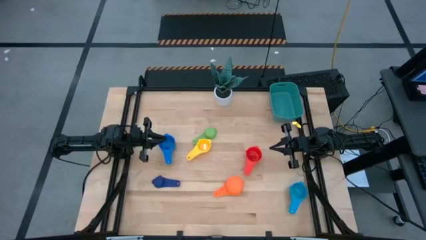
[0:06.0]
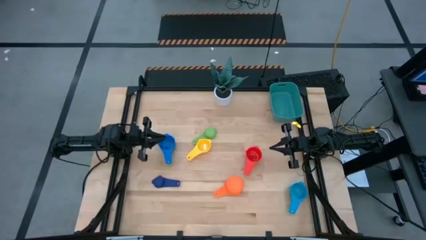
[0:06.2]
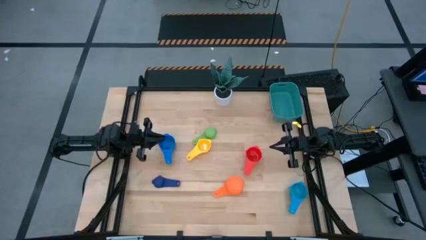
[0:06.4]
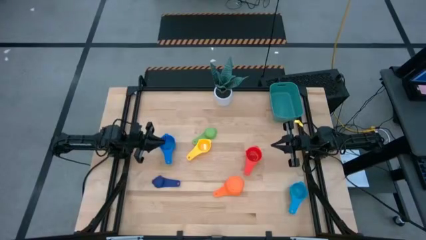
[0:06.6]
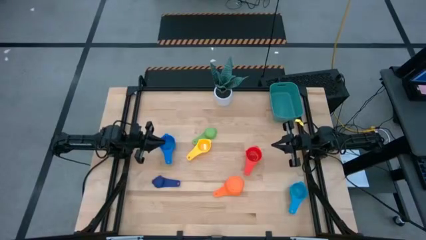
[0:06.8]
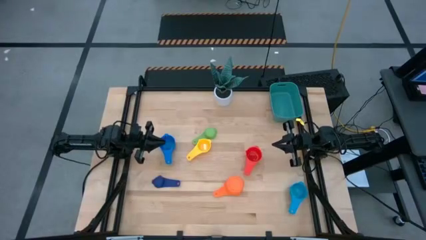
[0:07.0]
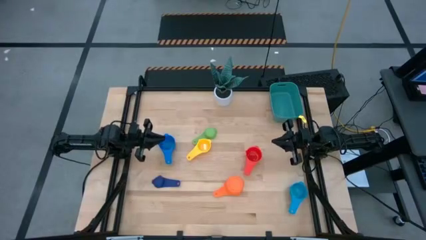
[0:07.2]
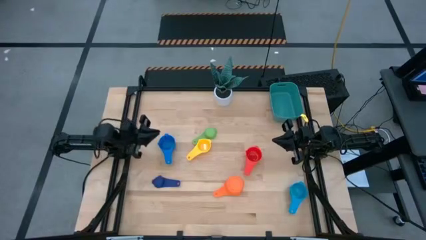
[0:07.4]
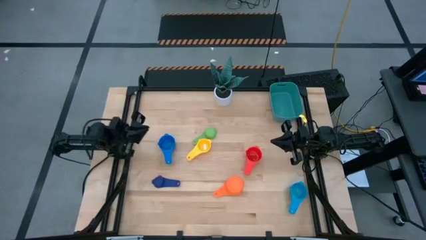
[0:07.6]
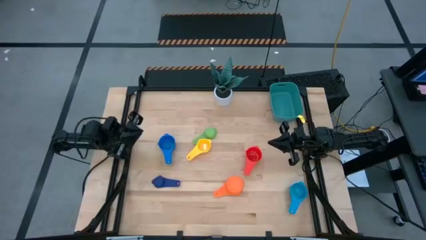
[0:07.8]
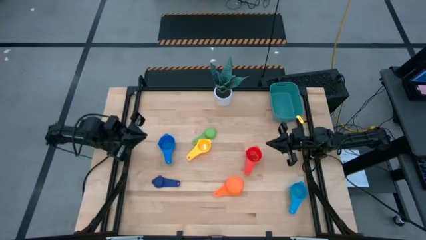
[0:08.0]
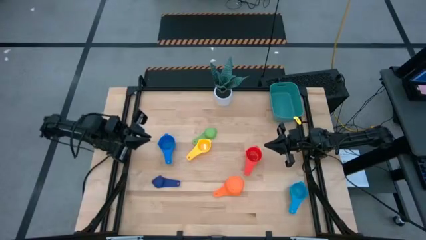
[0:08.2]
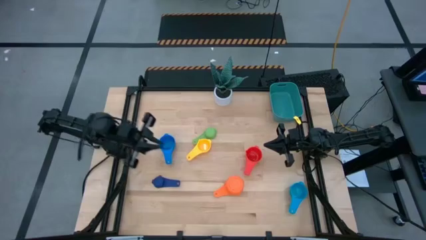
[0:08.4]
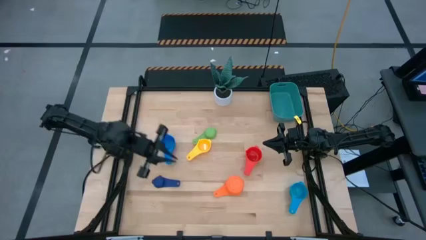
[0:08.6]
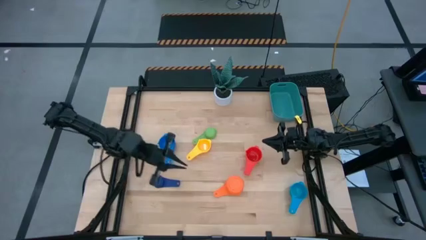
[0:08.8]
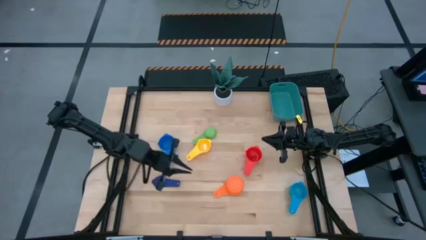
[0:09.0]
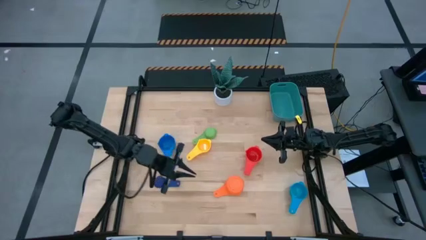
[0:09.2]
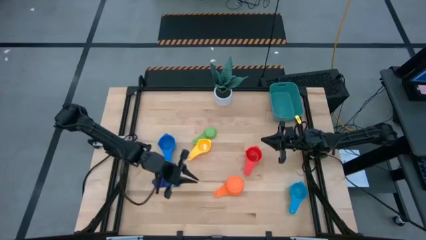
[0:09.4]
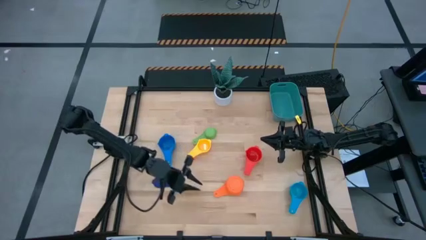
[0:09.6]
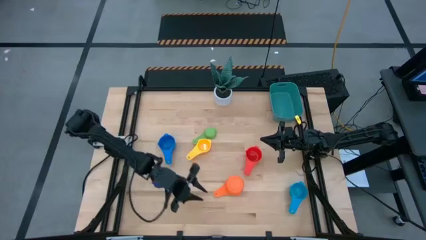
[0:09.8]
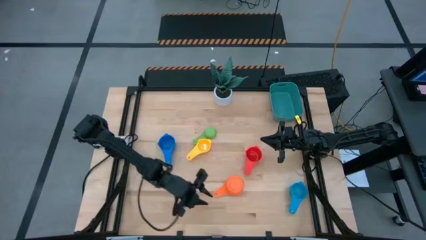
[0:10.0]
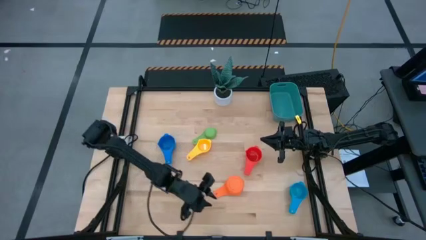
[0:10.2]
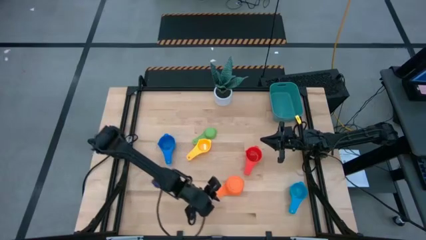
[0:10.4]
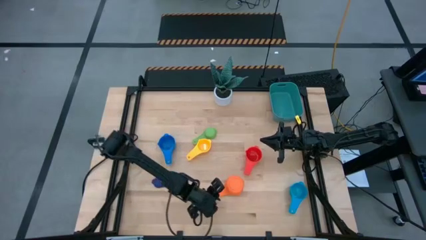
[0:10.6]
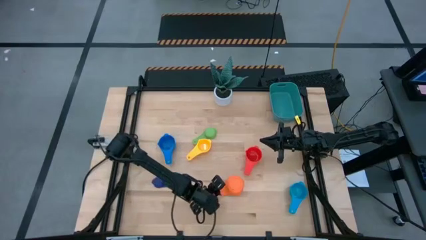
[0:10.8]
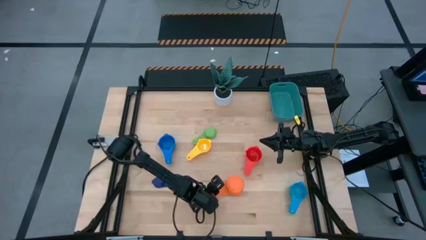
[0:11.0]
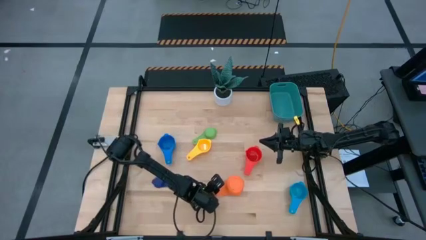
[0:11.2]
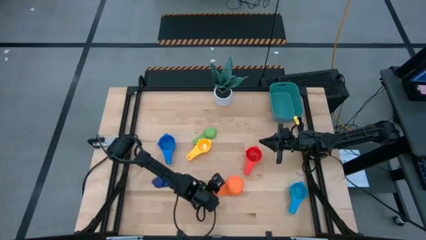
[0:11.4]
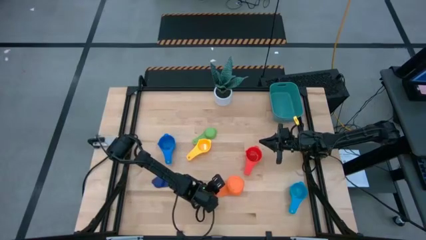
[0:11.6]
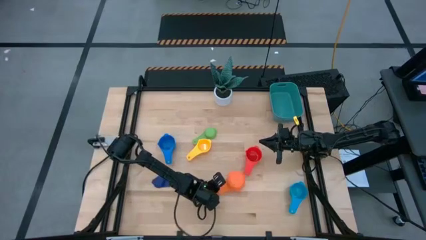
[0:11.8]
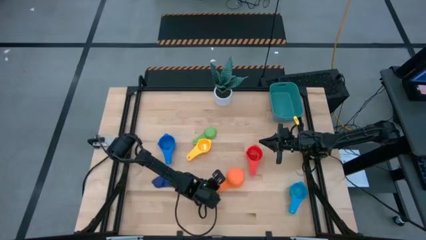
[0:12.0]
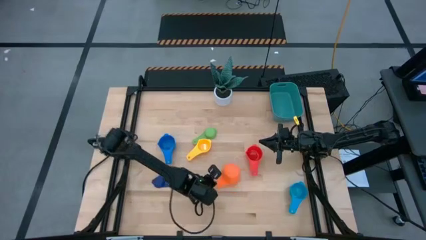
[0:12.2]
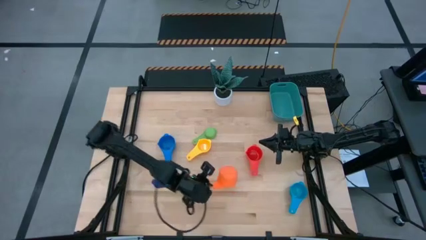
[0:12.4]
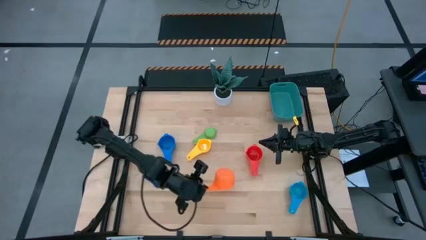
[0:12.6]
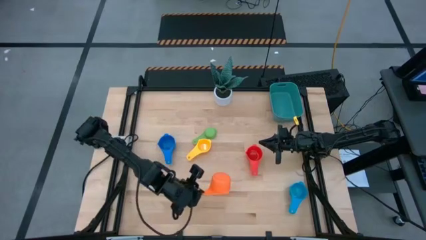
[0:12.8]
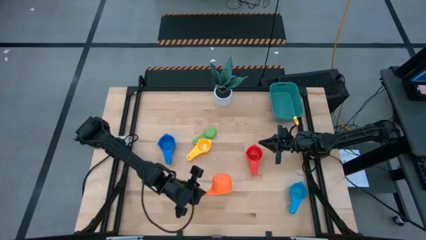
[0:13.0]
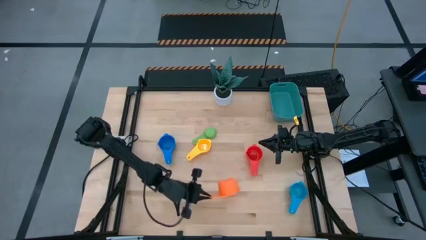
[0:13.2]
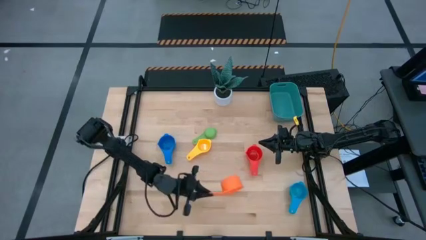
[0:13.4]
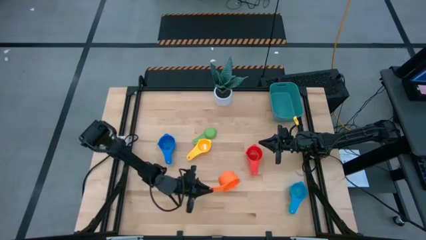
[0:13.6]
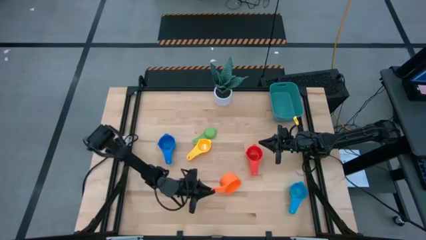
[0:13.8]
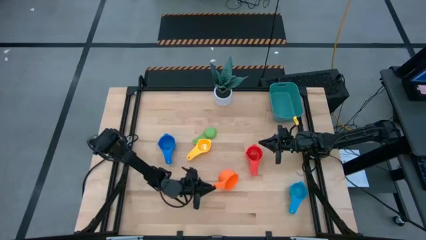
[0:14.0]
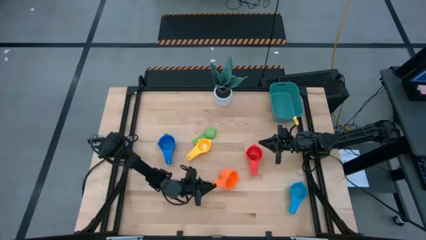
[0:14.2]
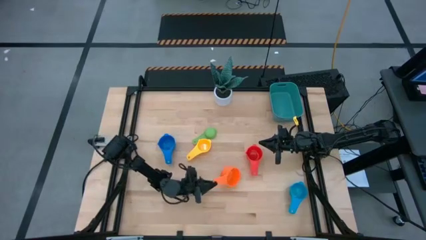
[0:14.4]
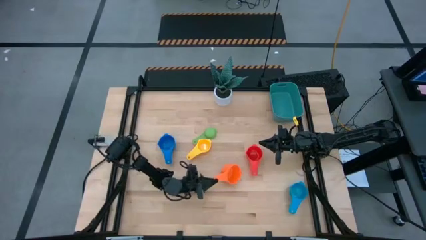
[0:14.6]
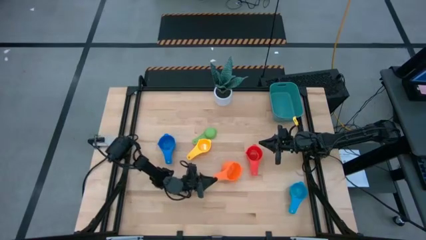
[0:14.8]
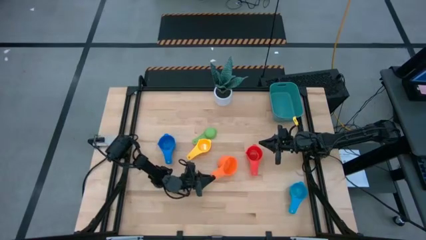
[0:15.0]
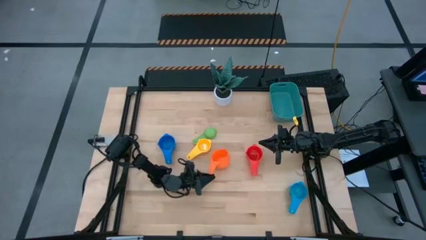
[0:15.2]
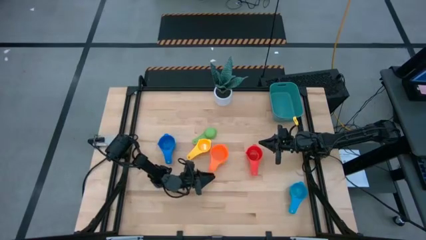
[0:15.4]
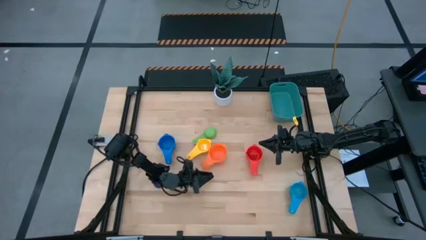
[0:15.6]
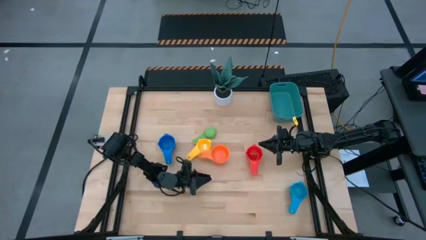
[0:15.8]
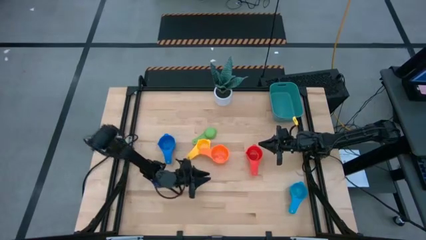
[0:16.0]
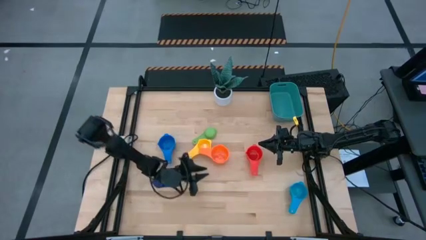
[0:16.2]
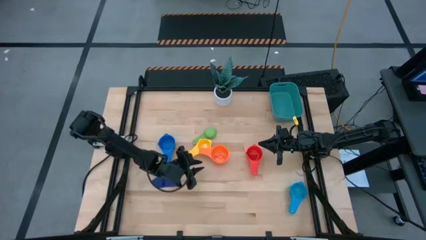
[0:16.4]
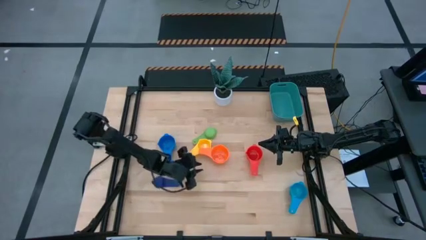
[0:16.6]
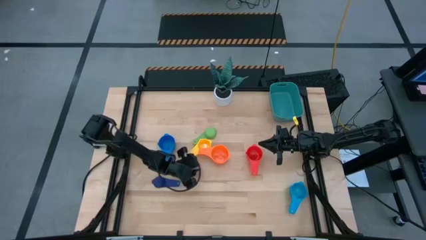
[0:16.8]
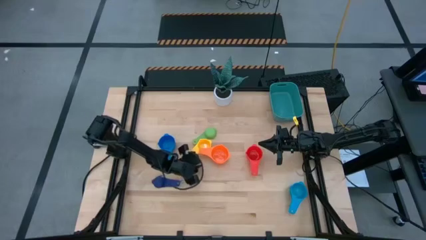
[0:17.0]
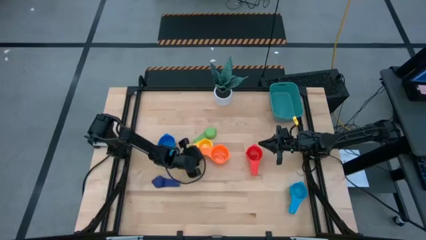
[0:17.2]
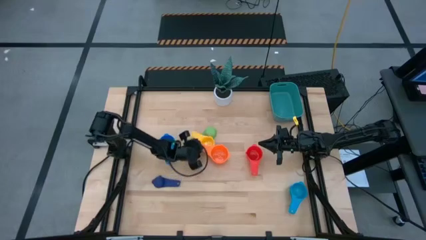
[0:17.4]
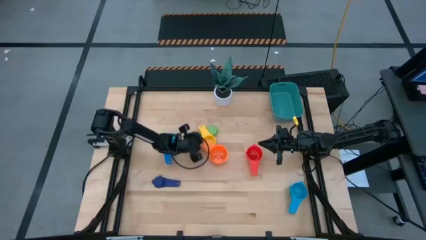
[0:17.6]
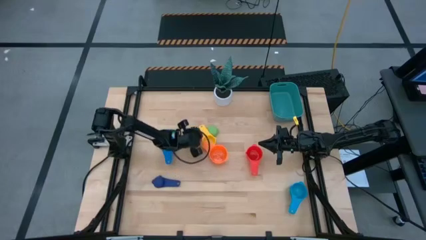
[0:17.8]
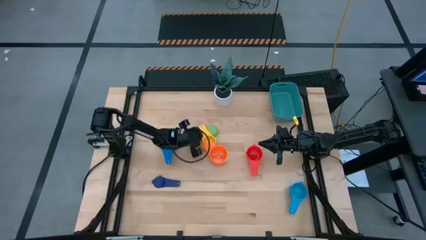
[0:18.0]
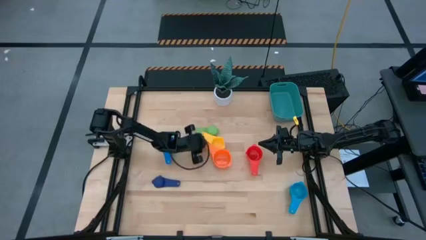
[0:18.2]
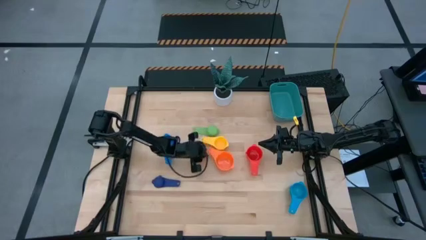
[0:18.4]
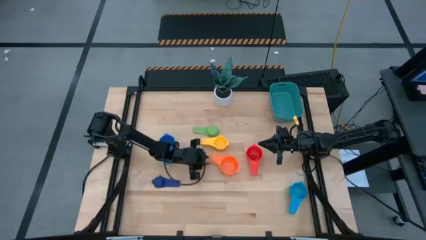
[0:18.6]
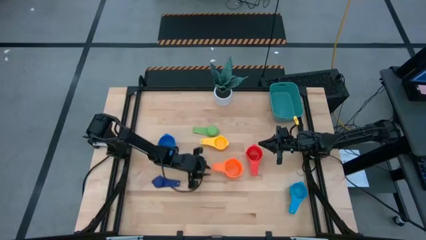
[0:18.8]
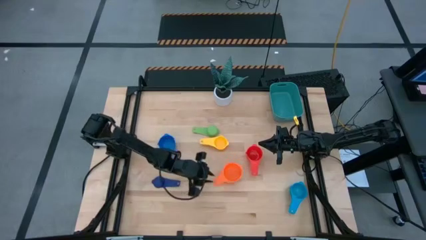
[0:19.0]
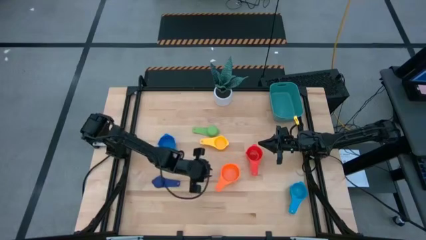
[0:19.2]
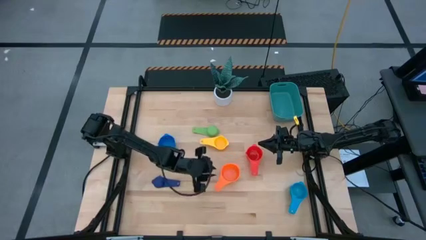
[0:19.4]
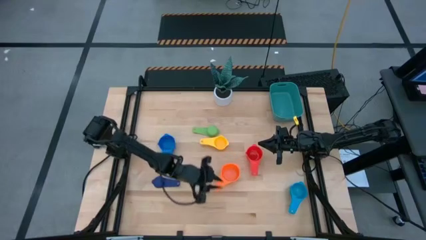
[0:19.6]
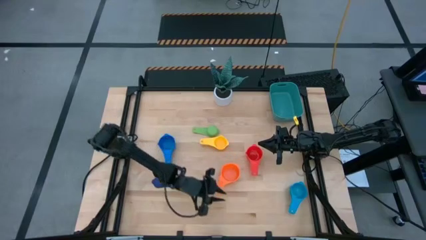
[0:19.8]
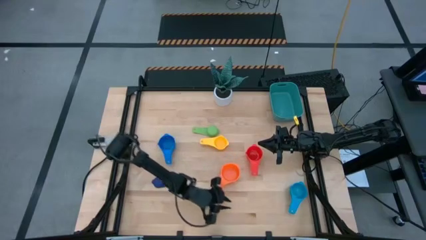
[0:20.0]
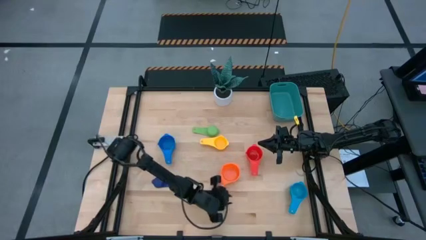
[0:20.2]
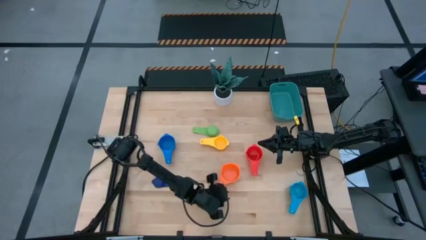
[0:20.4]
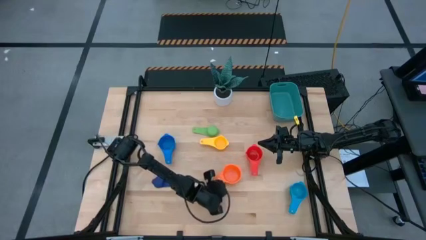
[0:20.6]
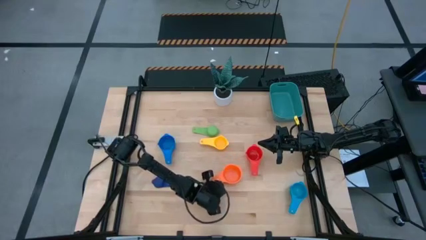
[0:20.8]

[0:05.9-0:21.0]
Task: Nest measuring cups in basket
Prepare the orange measuring cup

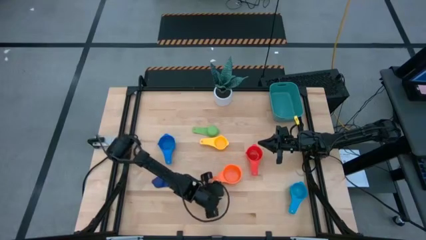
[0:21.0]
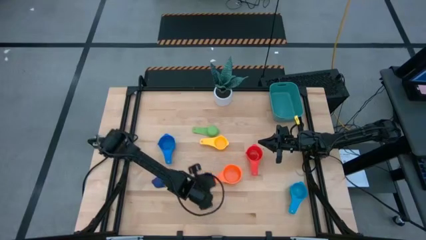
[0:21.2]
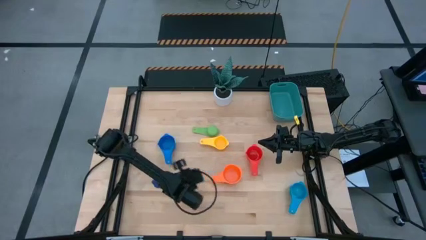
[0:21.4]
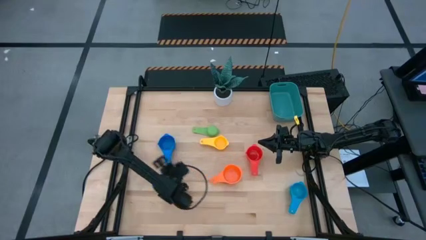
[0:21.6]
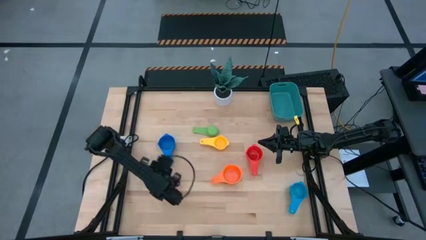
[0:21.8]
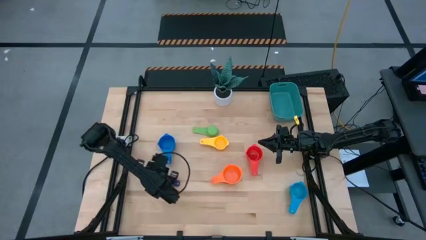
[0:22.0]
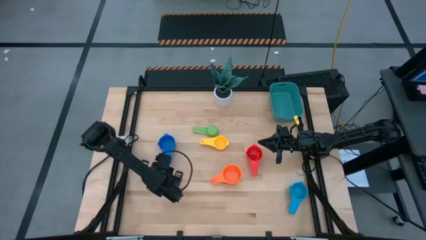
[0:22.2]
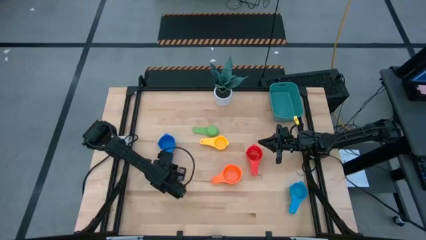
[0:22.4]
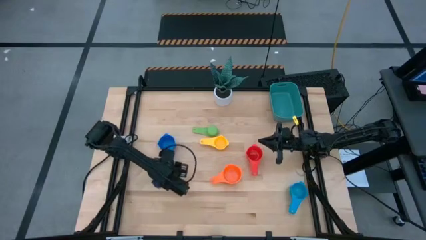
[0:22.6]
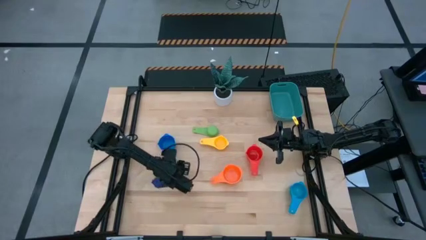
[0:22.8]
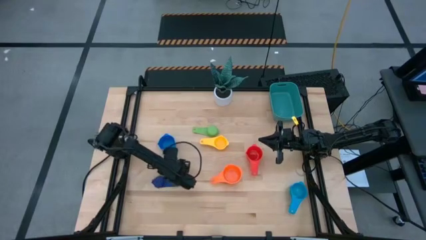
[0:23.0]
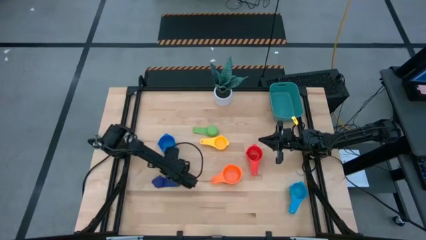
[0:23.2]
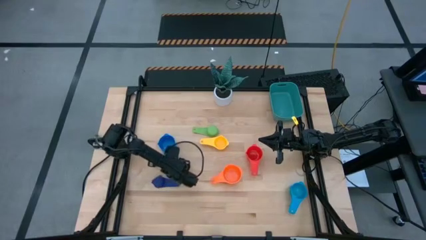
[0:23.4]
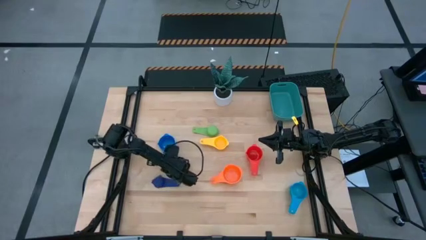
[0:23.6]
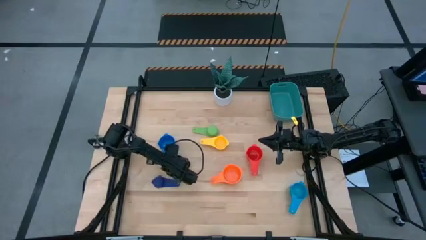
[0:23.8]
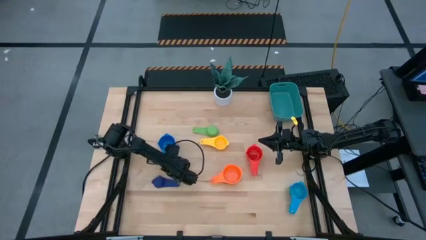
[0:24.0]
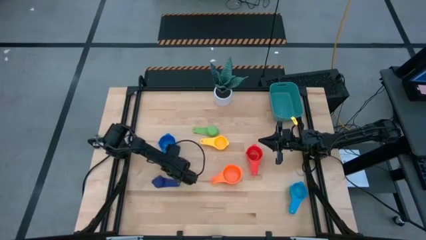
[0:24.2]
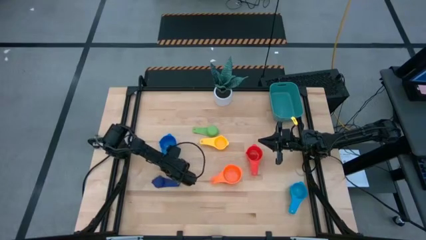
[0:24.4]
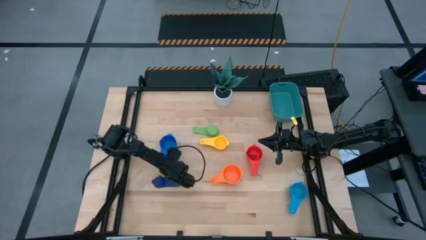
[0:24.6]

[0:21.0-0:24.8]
Stack the blue measuring cup on top of the orange measuring cup
